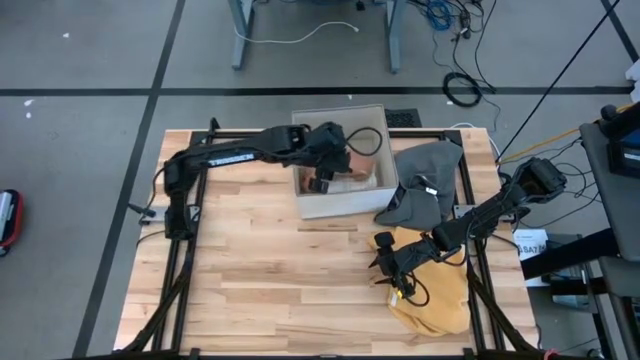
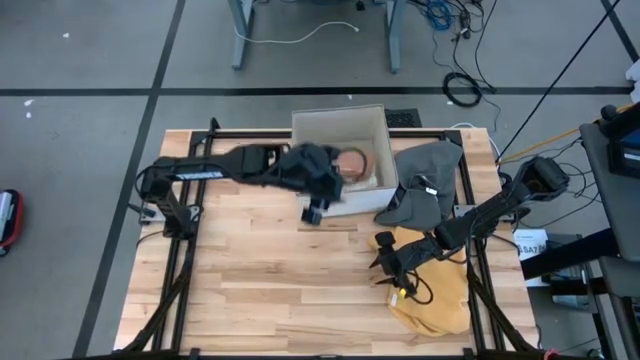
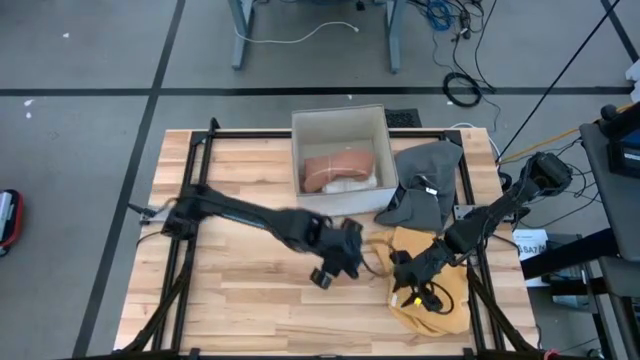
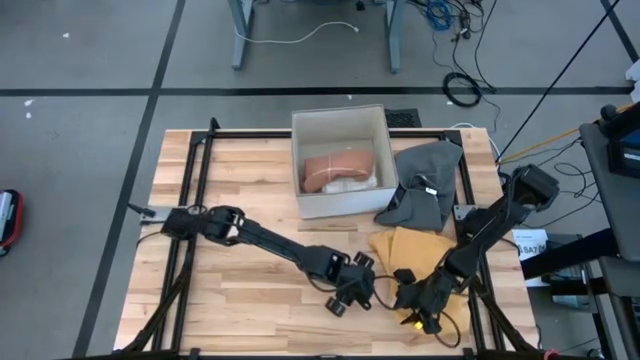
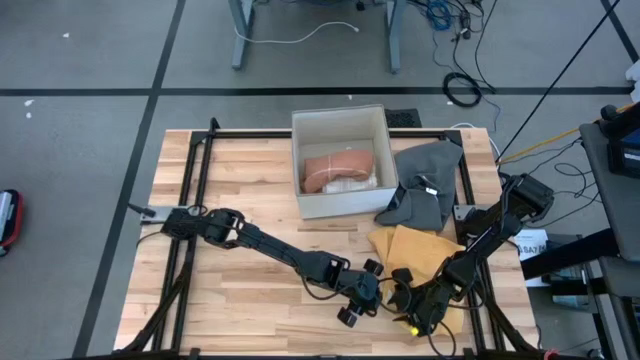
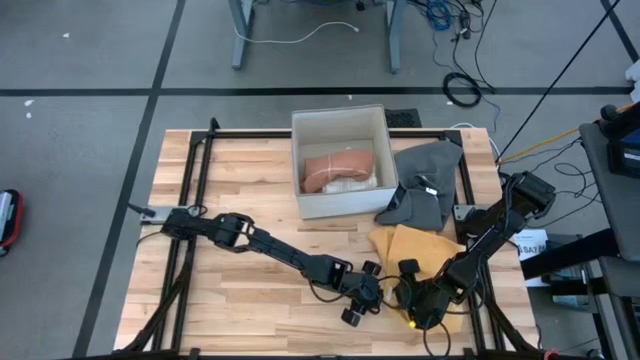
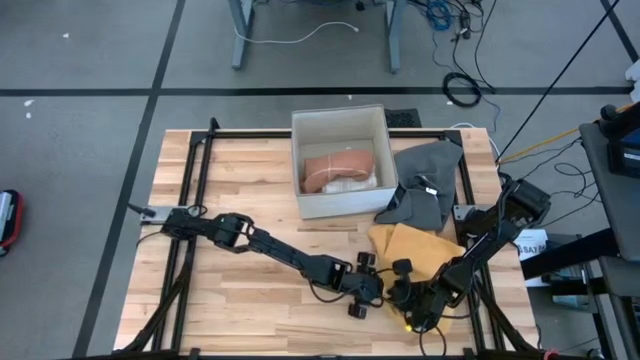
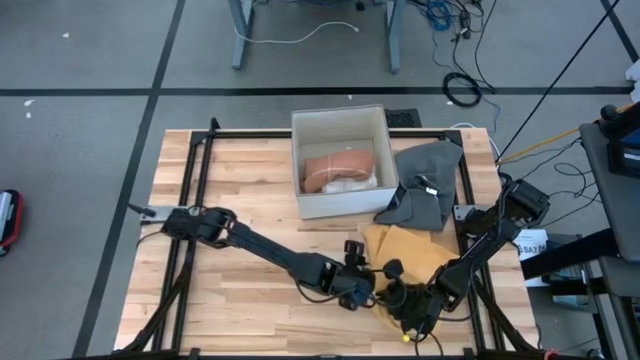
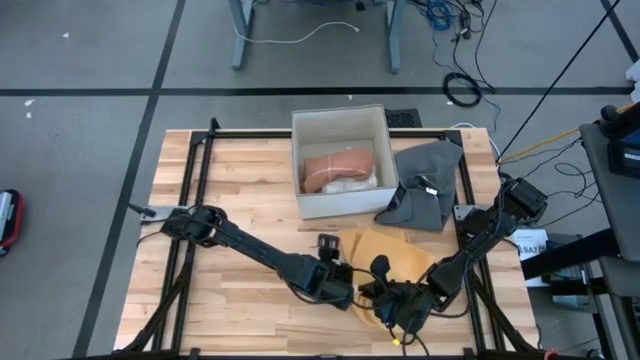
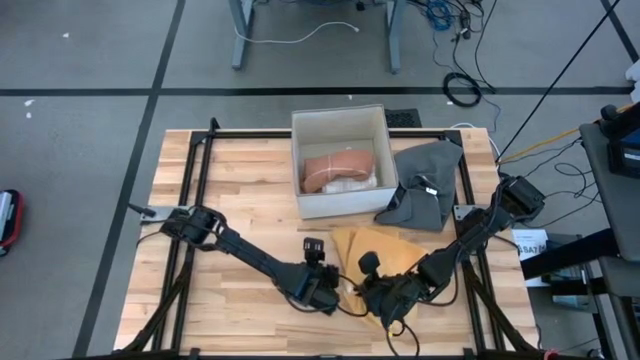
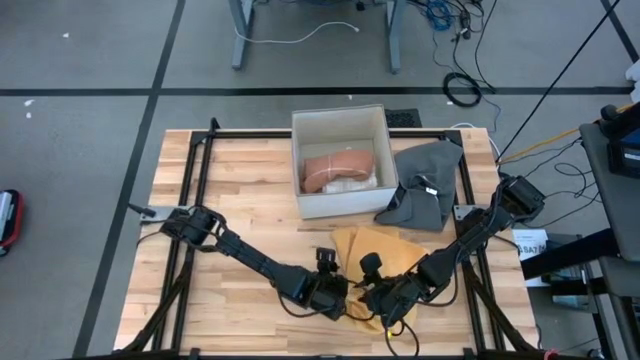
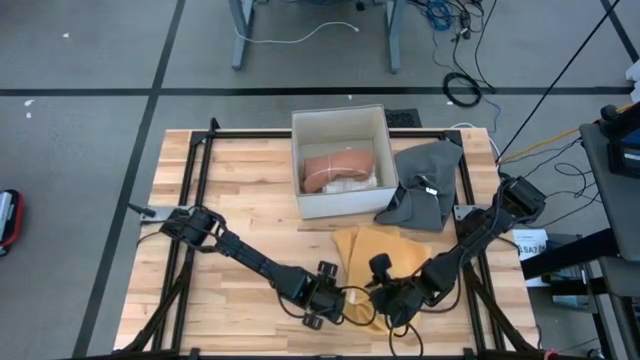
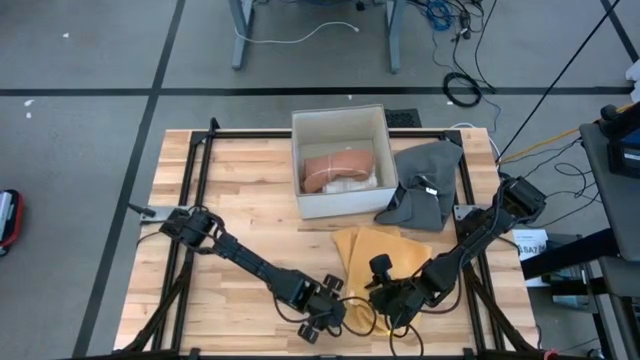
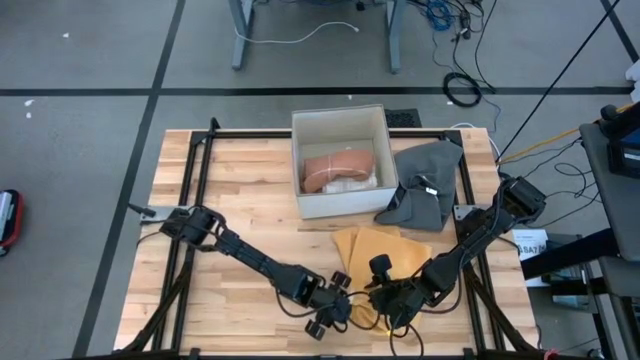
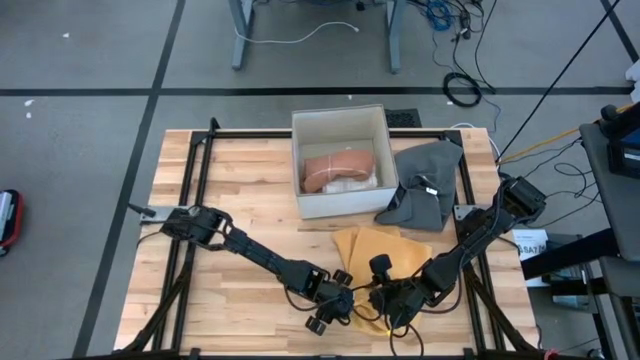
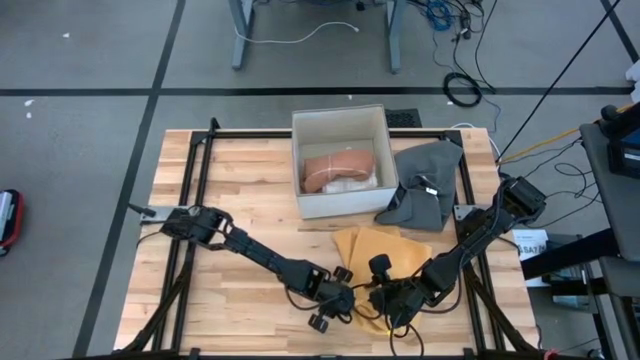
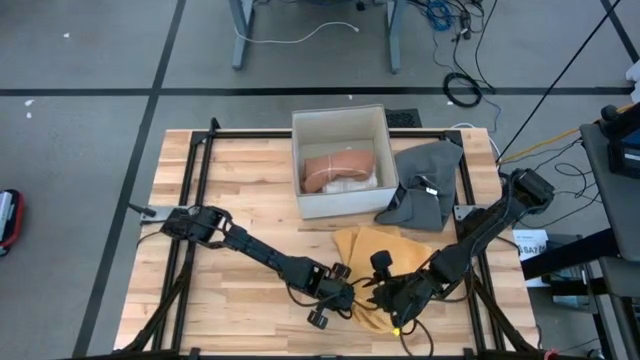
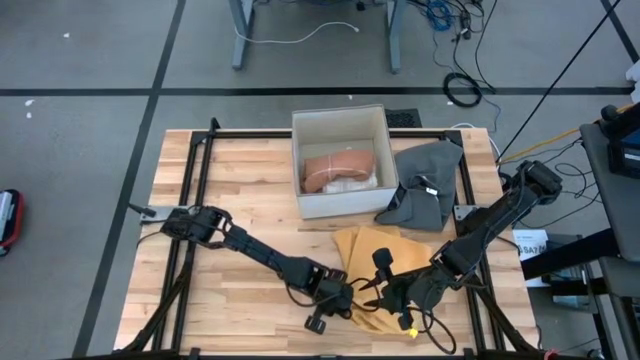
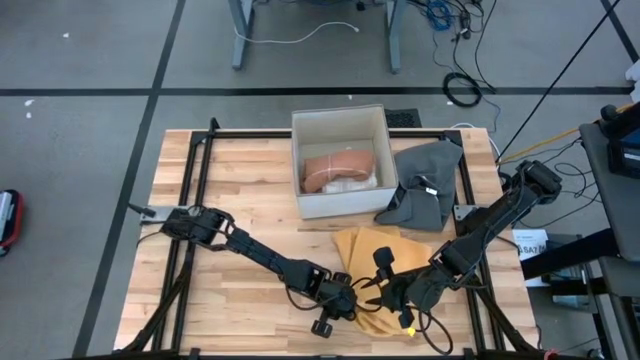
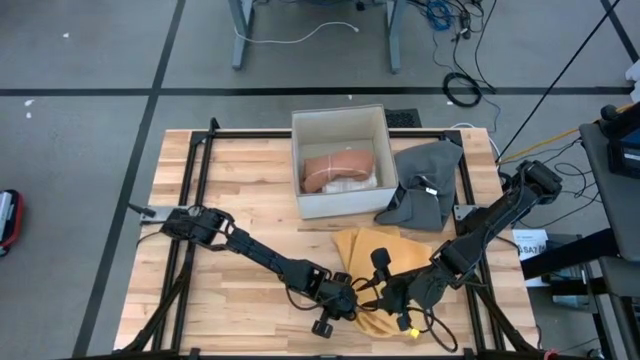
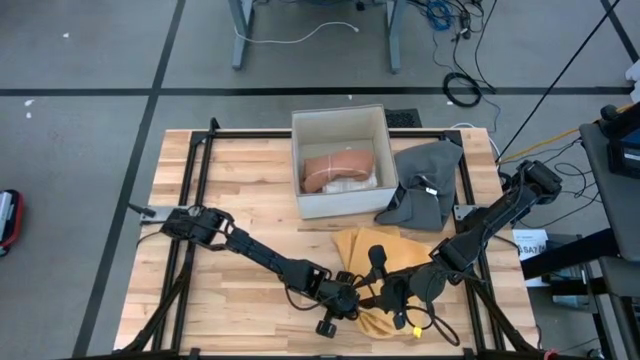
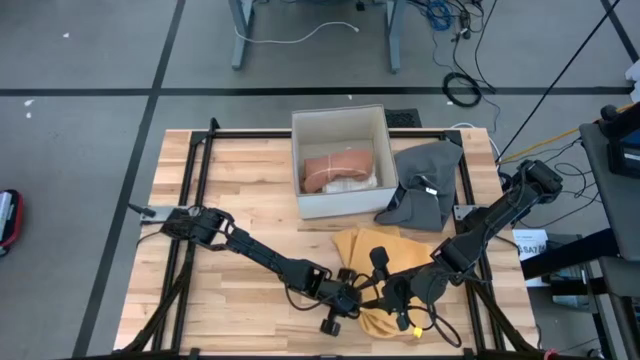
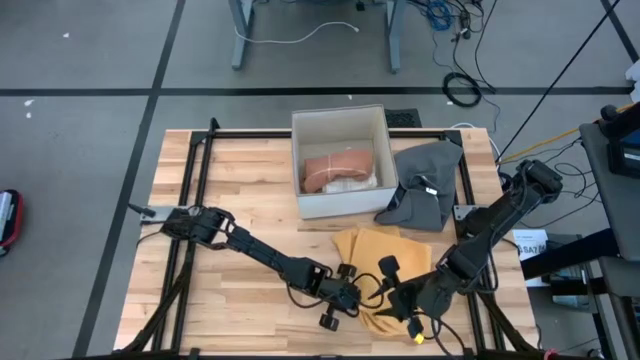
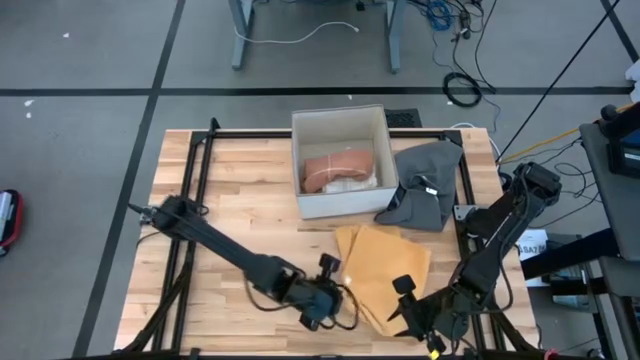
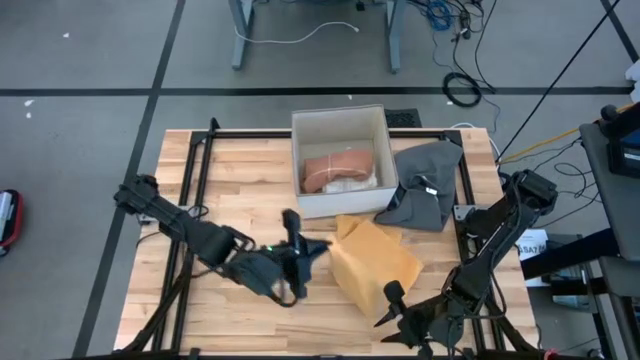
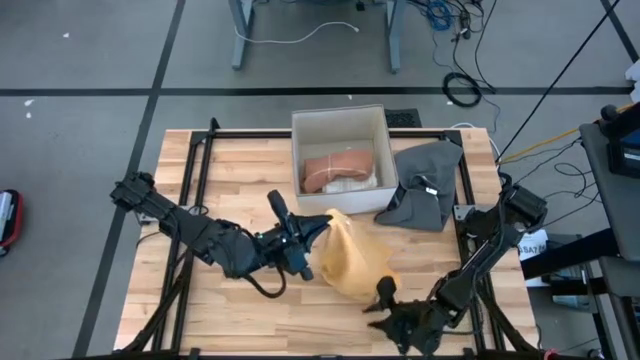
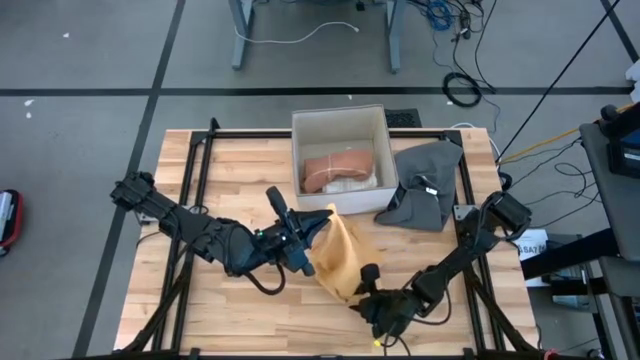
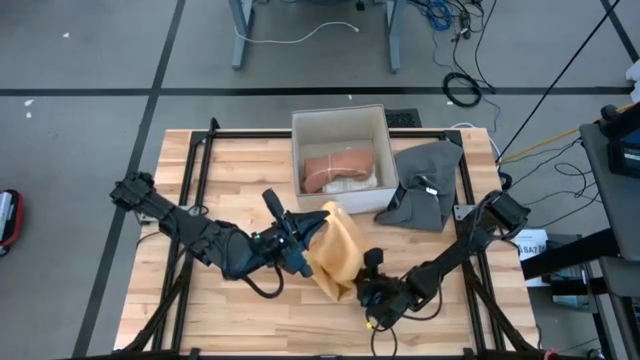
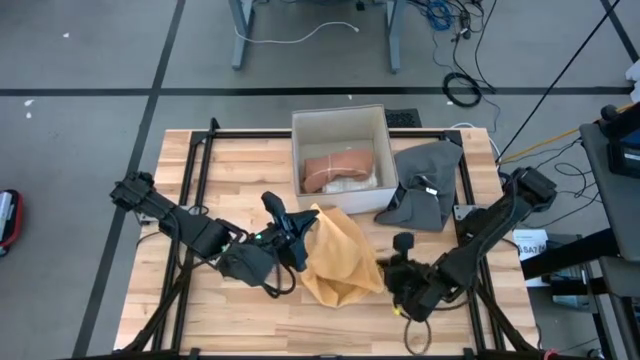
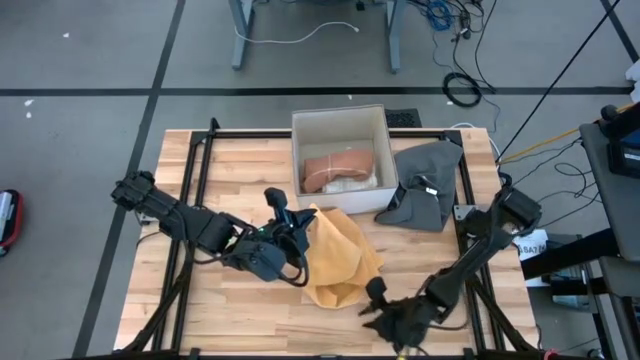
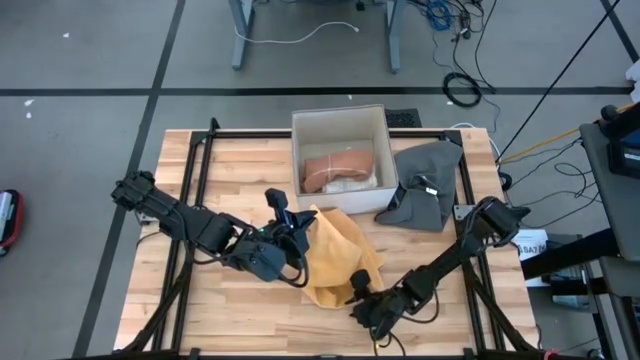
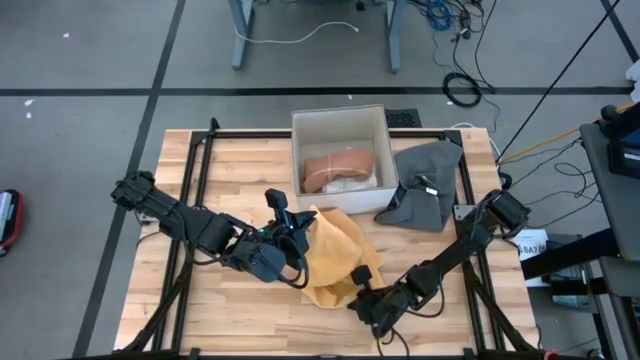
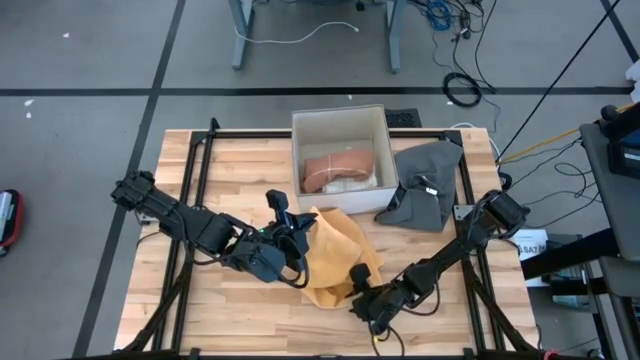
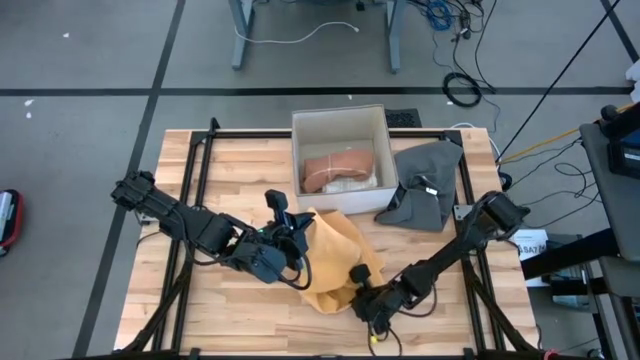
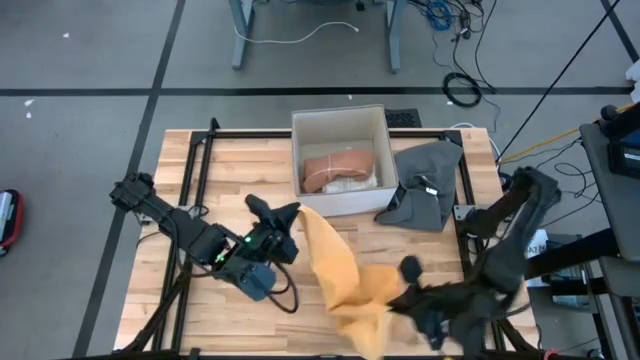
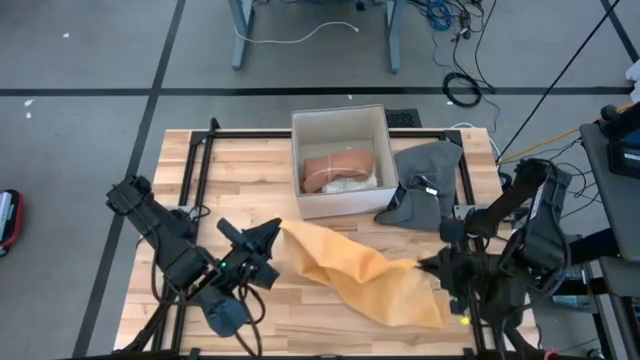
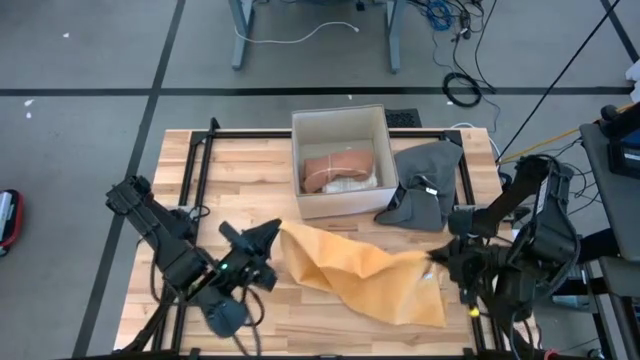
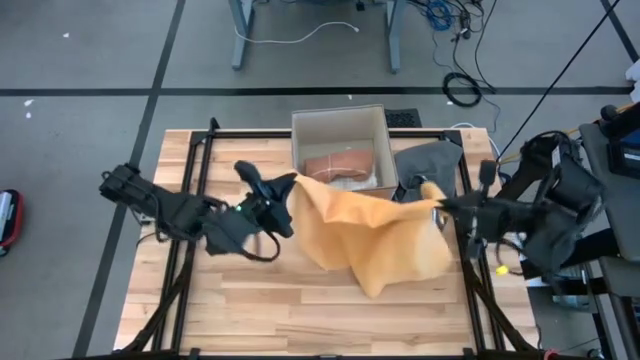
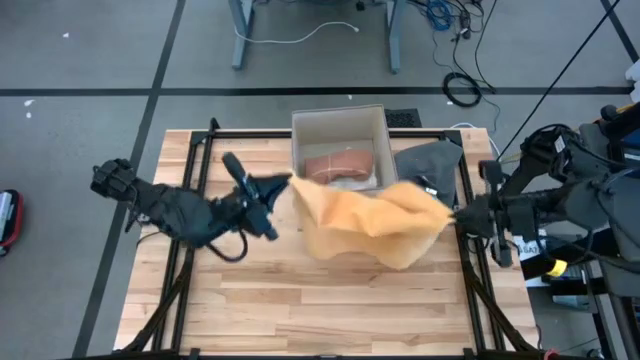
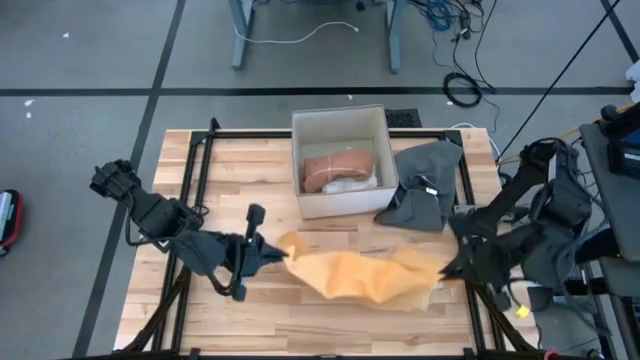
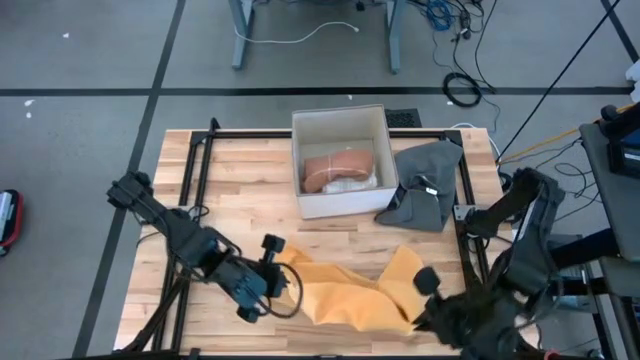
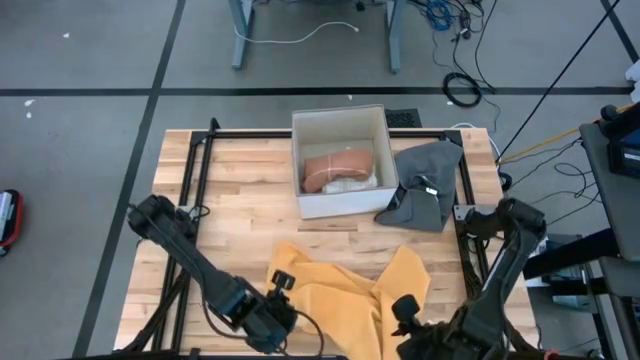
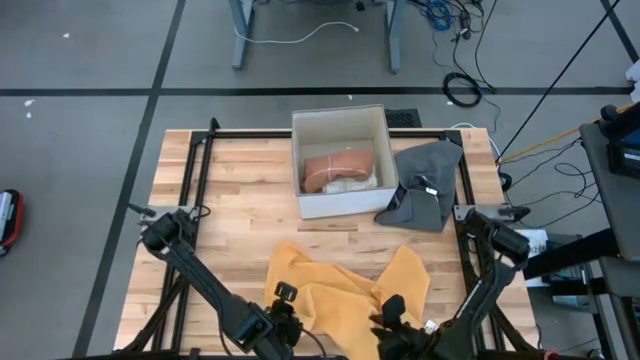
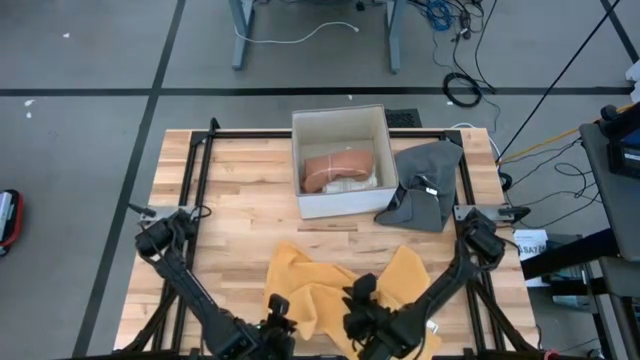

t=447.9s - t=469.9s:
Task: Fold towel
Fold the orange towel
